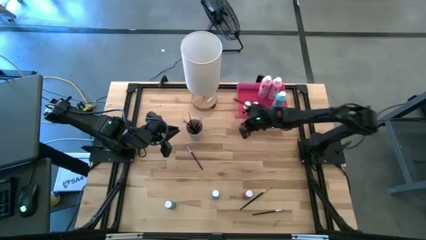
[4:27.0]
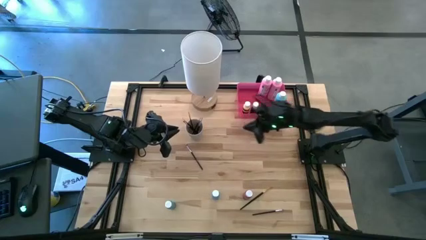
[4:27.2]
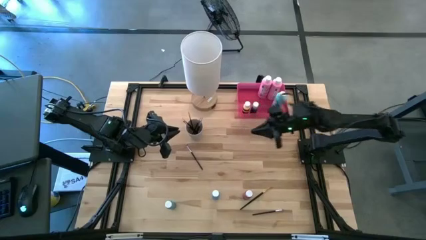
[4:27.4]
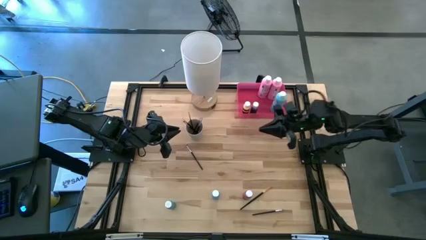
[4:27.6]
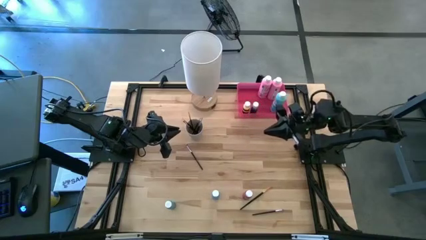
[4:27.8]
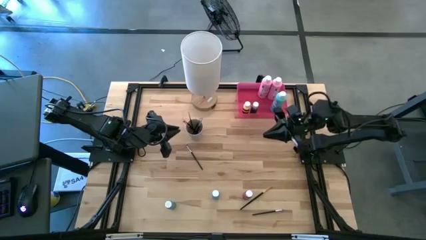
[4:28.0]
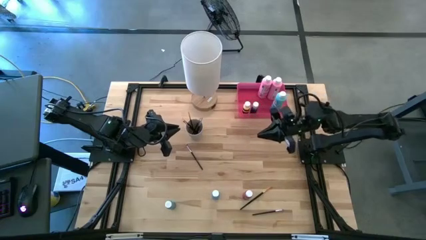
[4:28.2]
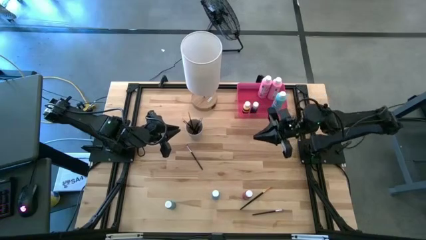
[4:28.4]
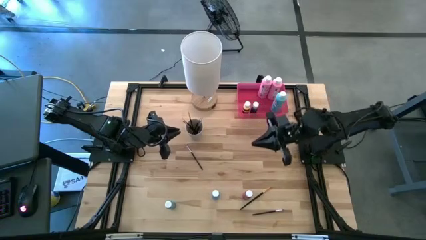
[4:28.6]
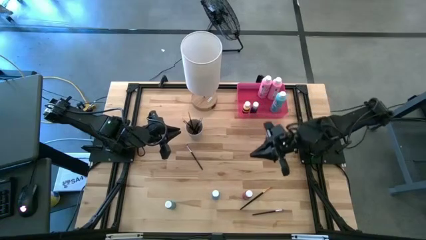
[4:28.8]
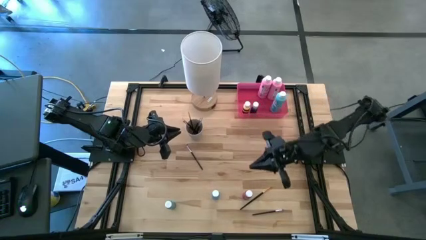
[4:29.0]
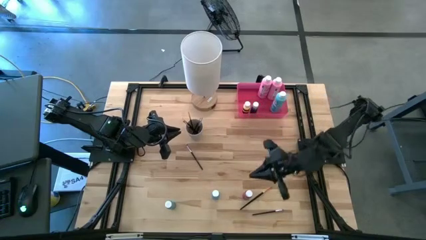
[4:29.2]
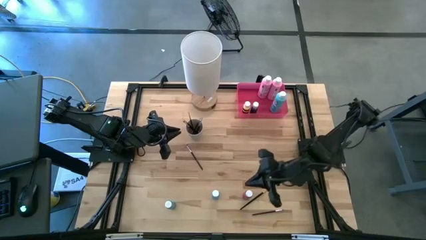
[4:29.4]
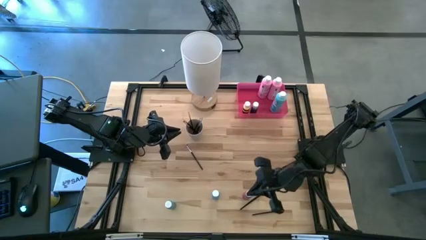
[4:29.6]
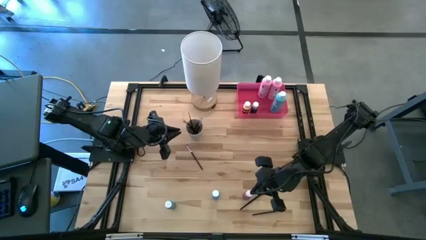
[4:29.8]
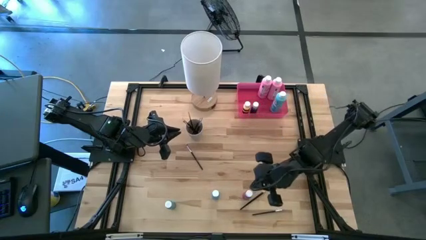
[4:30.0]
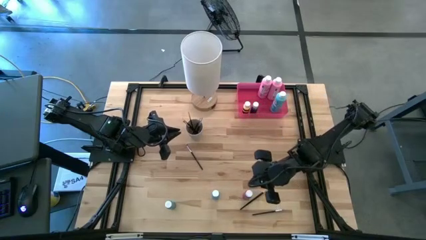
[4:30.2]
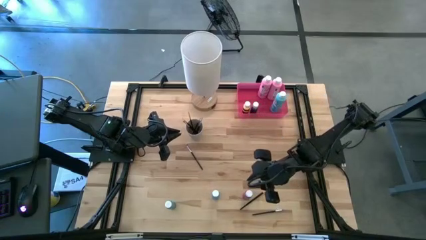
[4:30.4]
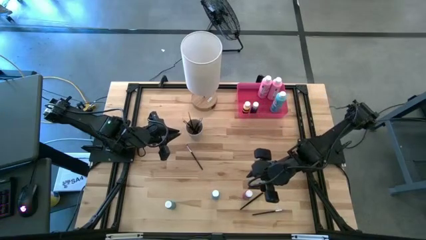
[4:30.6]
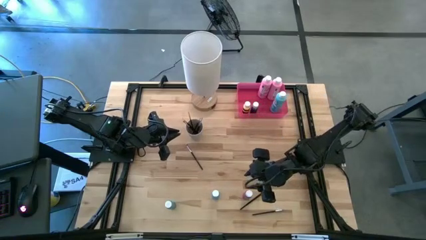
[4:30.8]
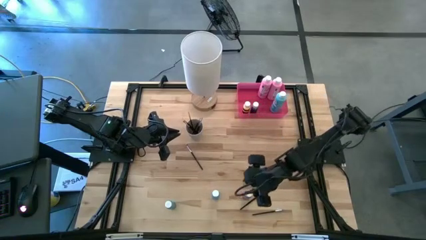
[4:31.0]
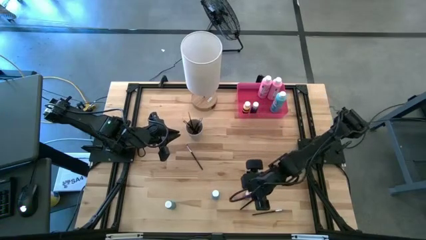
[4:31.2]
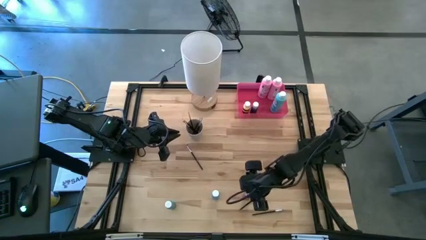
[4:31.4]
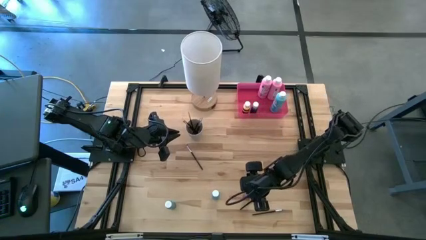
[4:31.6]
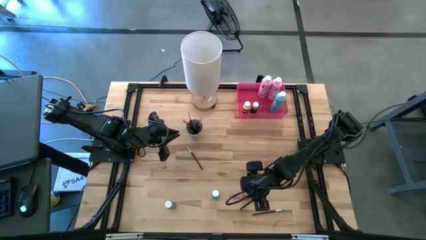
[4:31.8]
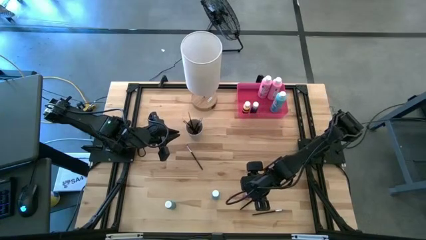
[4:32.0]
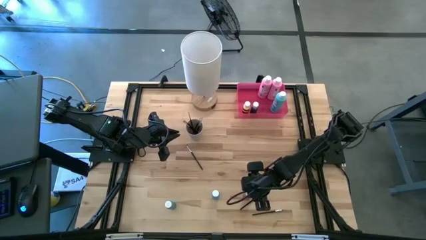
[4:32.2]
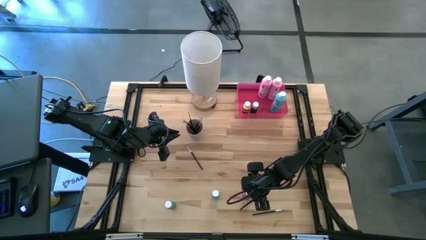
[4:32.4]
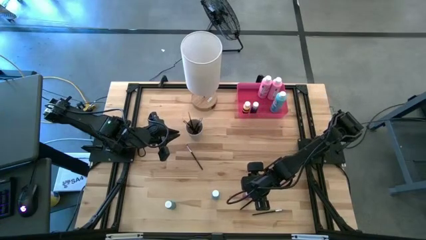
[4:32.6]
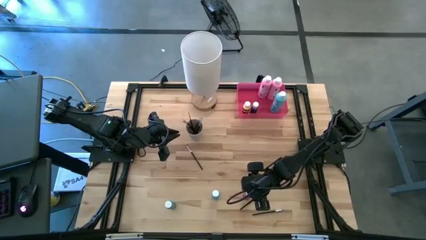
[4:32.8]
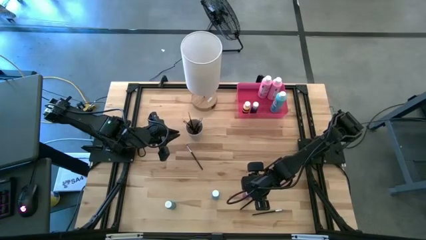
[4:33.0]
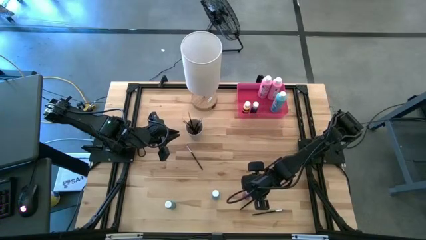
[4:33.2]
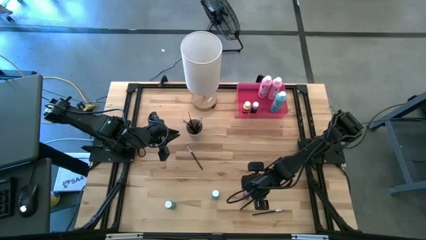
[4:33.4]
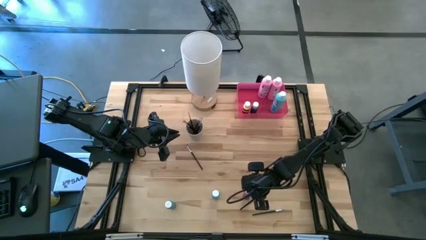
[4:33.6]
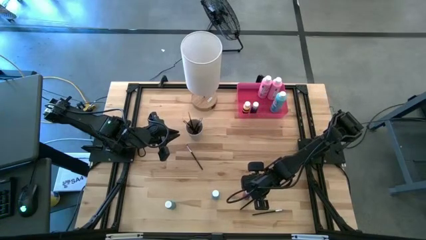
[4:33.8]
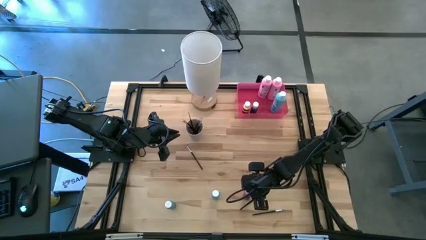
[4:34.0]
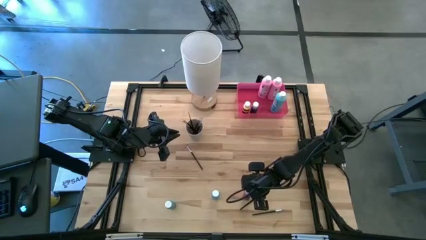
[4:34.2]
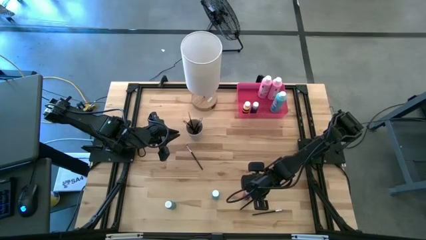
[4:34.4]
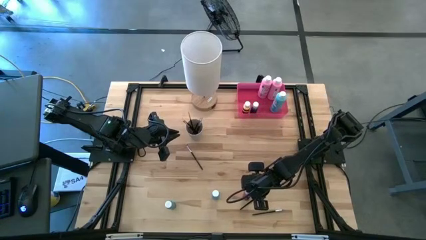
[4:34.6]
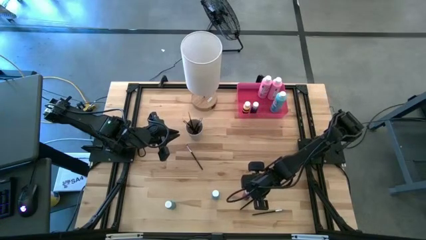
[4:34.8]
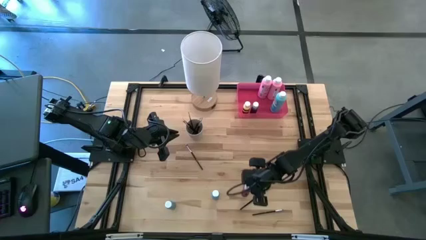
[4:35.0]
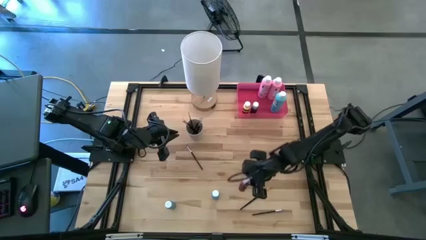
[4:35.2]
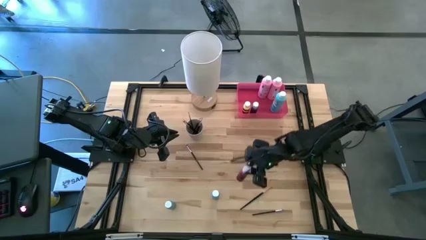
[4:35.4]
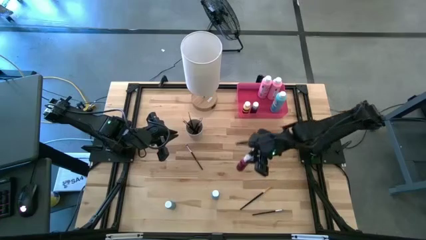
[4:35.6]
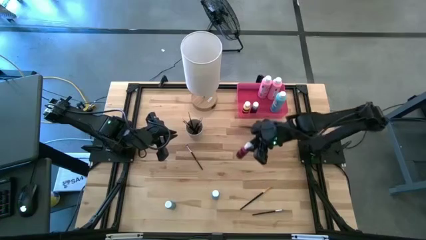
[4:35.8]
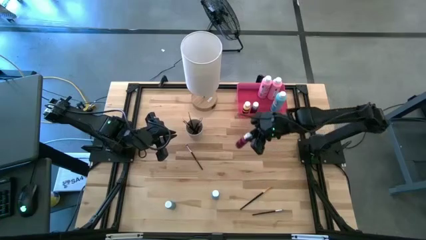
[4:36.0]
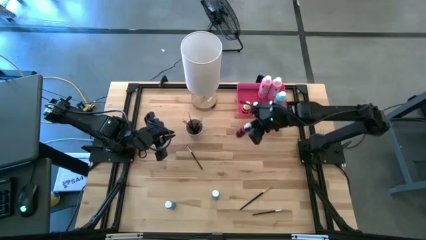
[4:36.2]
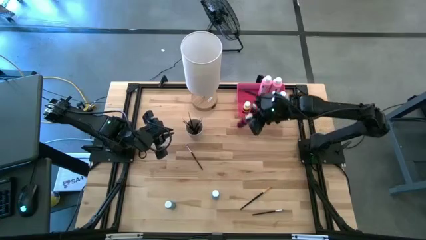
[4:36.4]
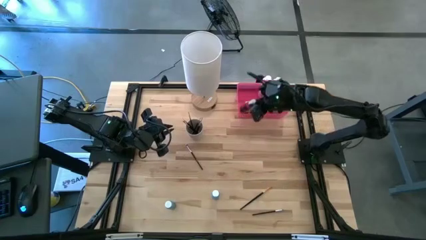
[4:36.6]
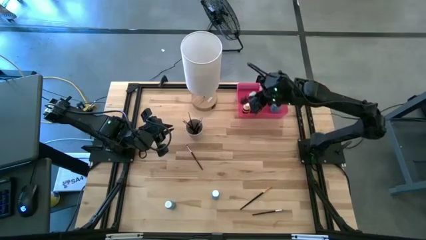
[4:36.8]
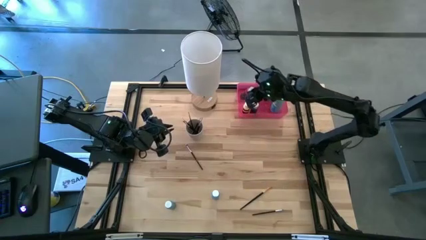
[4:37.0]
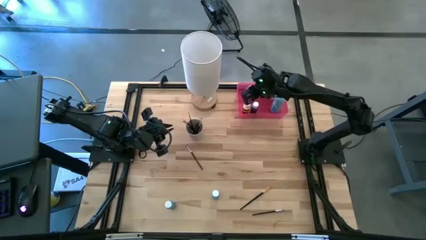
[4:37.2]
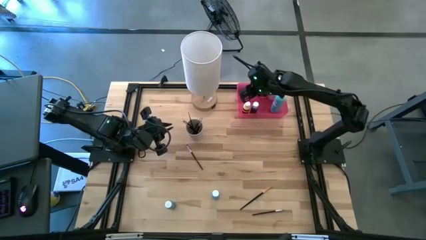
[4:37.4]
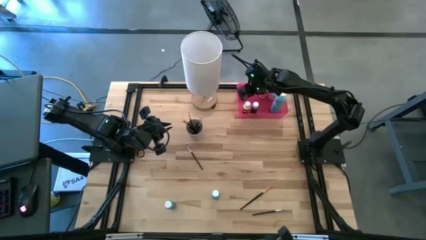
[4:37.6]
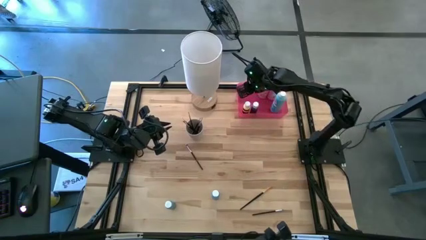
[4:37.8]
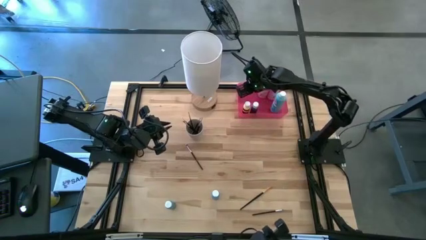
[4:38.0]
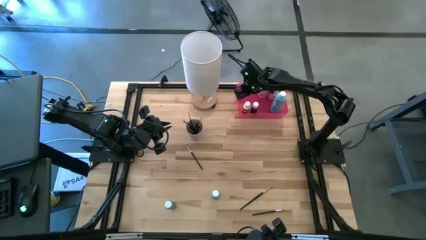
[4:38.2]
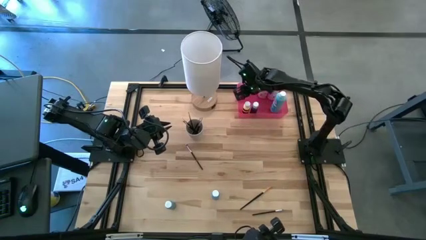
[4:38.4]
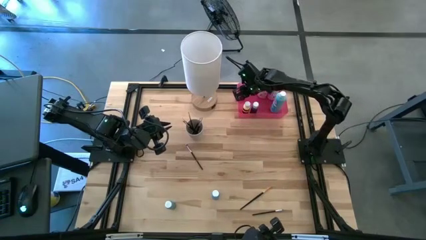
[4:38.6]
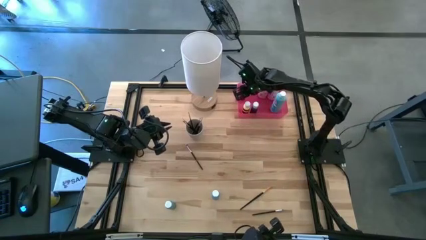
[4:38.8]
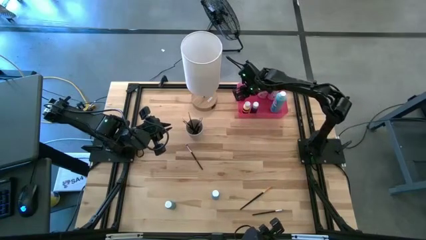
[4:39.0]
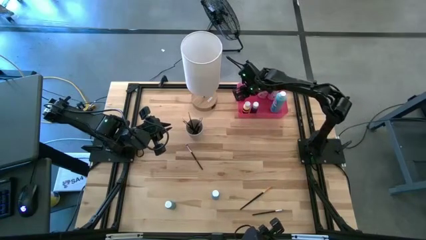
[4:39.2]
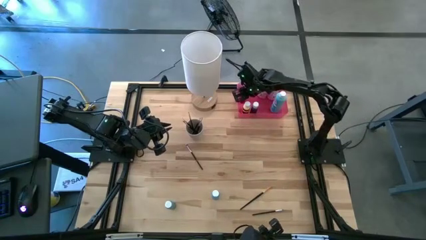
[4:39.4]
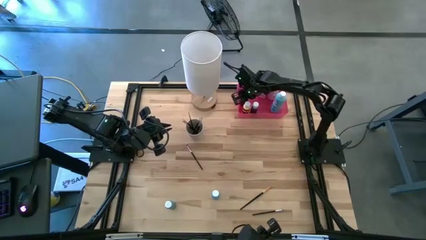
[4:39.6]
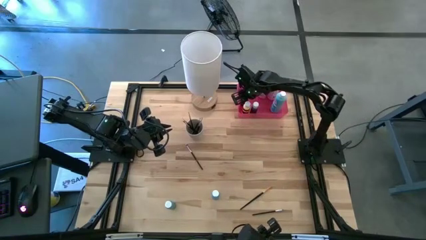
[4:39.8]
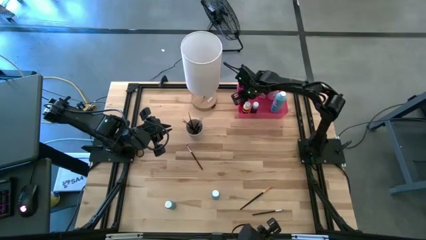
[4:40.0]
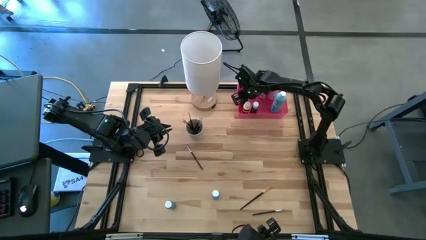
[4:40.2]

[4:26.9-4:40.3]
Task: Pick & Place Paint Supplies
Put the small pink paint bottle into the pink bin
